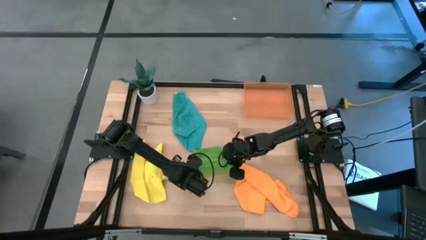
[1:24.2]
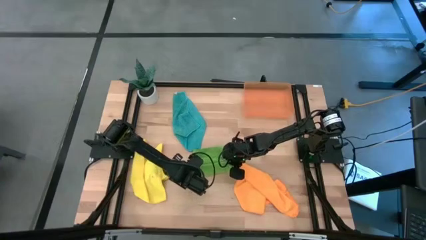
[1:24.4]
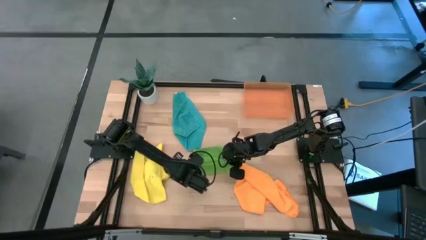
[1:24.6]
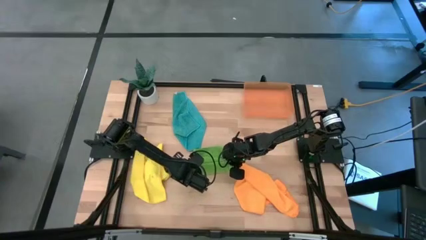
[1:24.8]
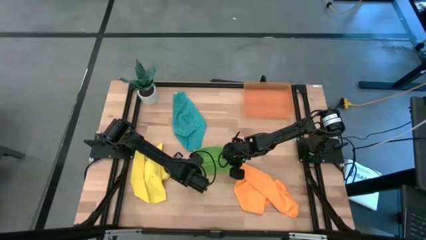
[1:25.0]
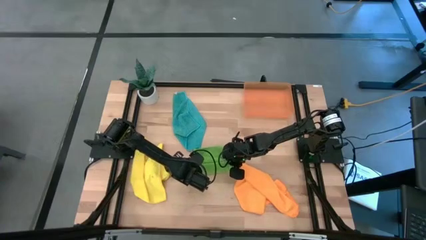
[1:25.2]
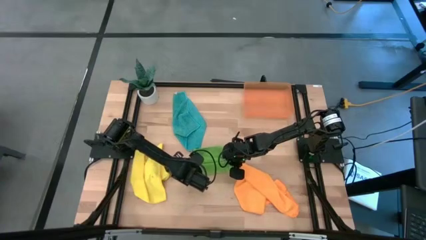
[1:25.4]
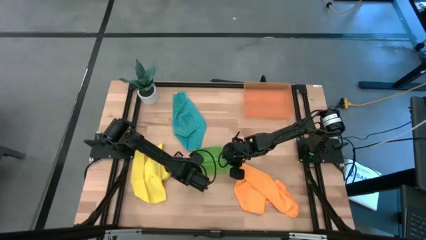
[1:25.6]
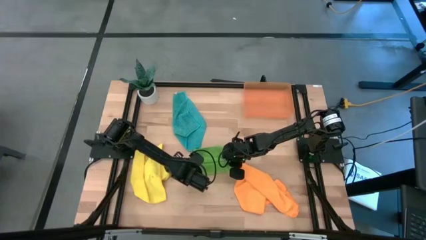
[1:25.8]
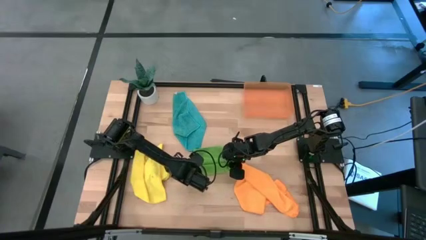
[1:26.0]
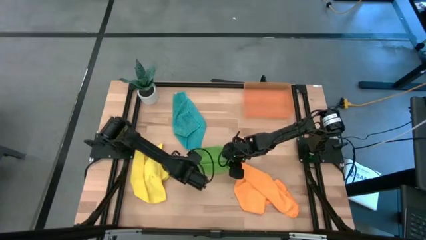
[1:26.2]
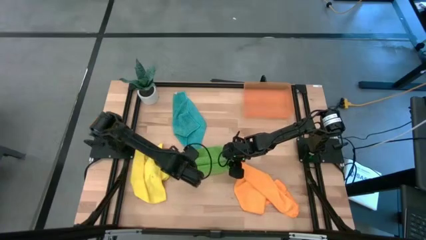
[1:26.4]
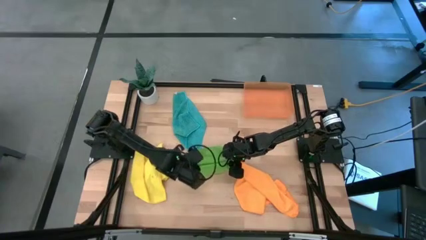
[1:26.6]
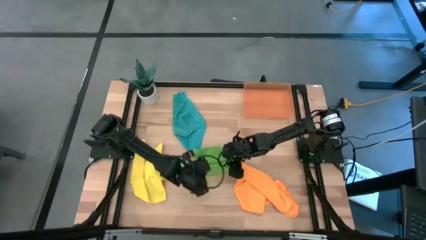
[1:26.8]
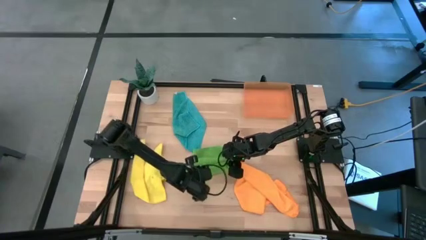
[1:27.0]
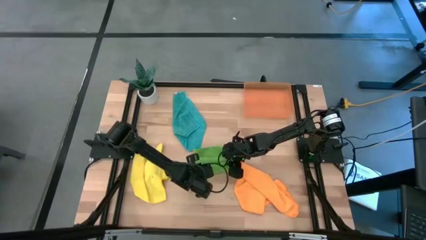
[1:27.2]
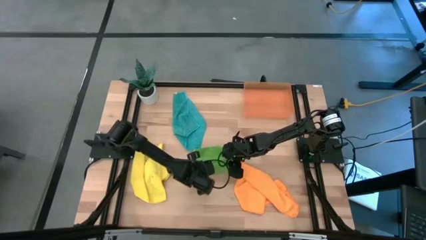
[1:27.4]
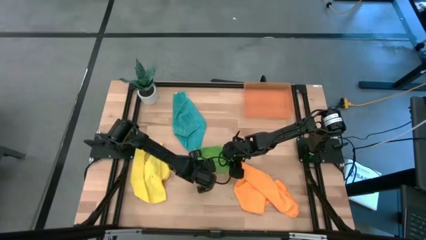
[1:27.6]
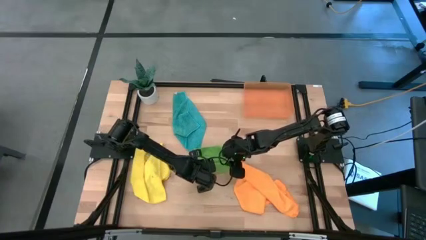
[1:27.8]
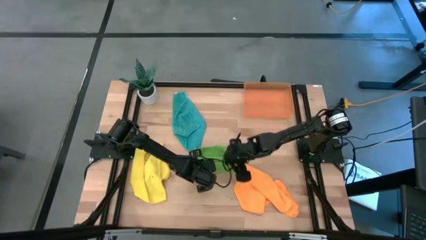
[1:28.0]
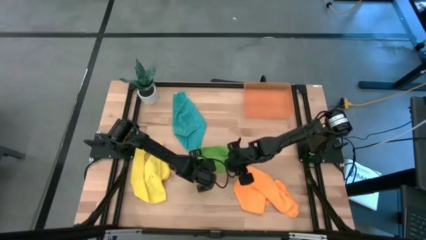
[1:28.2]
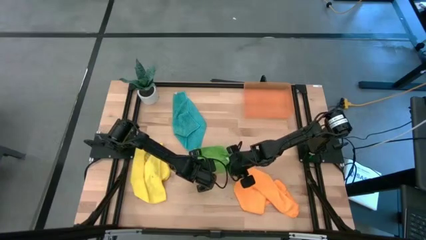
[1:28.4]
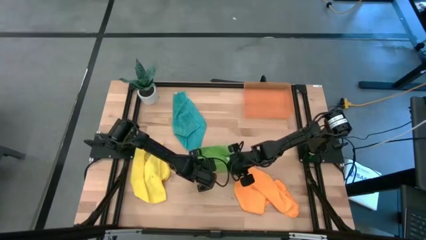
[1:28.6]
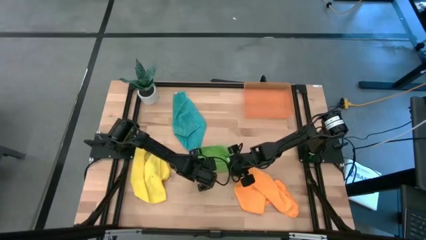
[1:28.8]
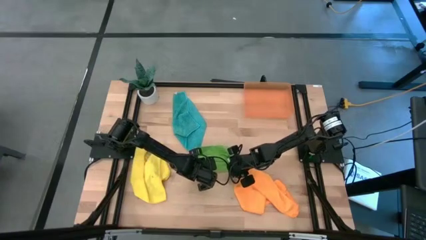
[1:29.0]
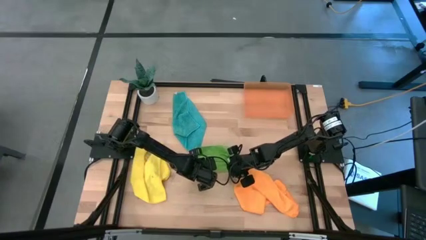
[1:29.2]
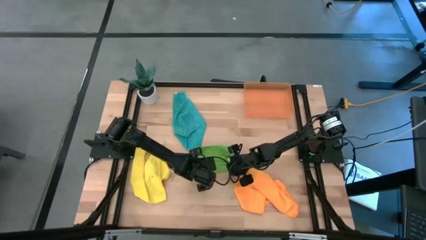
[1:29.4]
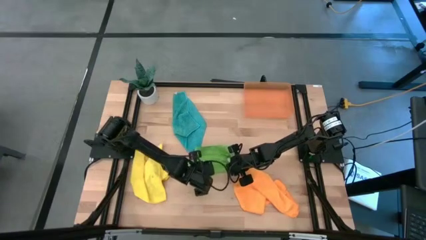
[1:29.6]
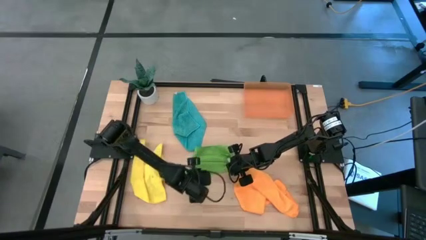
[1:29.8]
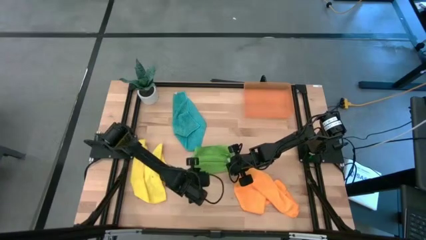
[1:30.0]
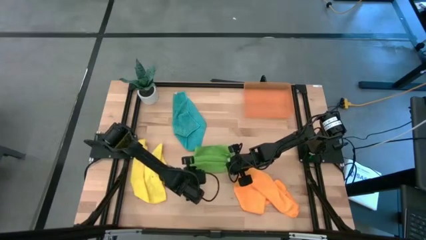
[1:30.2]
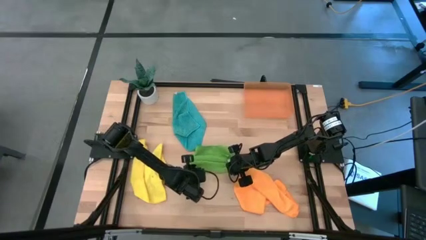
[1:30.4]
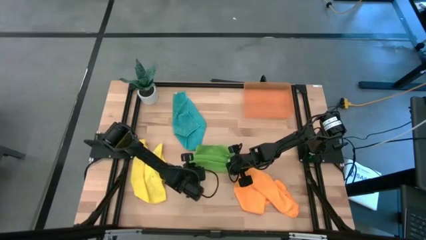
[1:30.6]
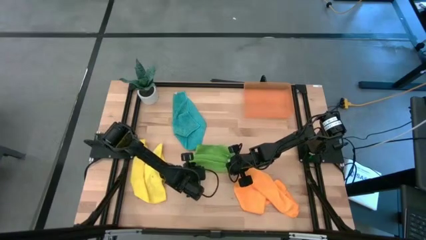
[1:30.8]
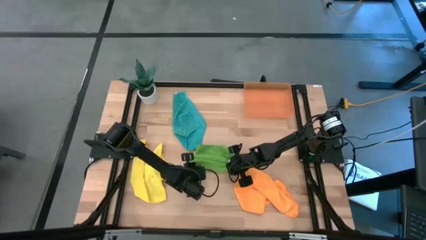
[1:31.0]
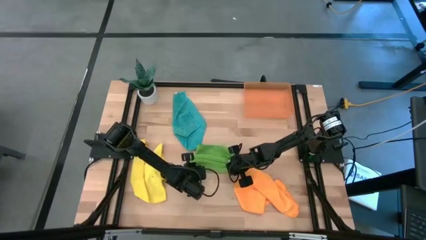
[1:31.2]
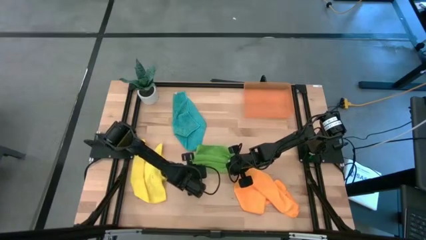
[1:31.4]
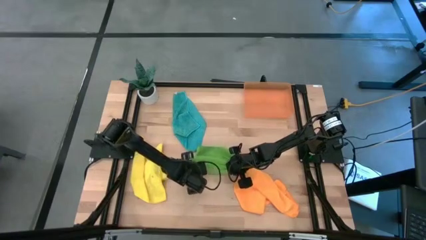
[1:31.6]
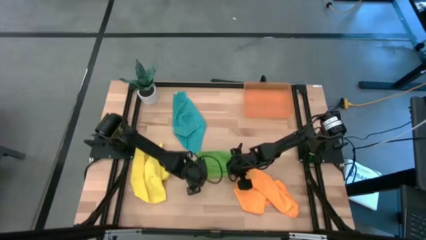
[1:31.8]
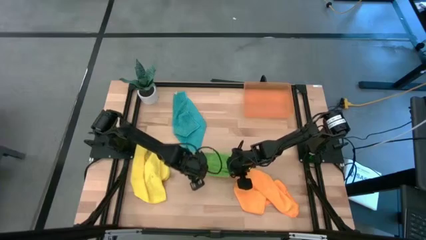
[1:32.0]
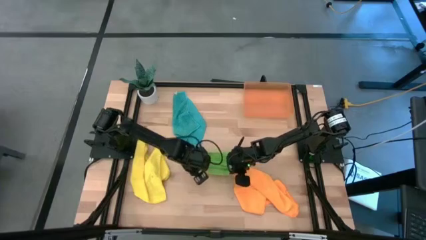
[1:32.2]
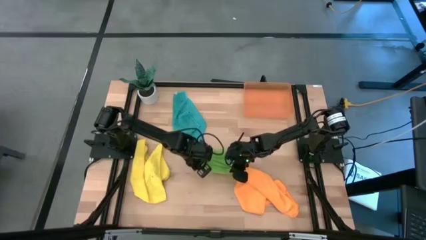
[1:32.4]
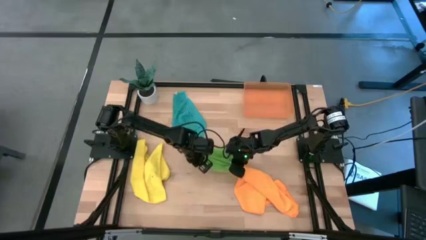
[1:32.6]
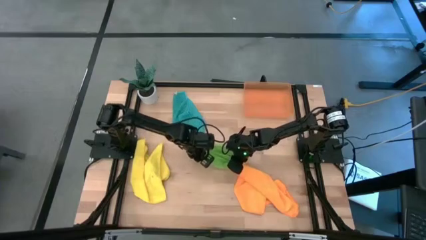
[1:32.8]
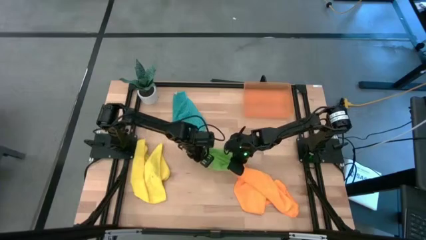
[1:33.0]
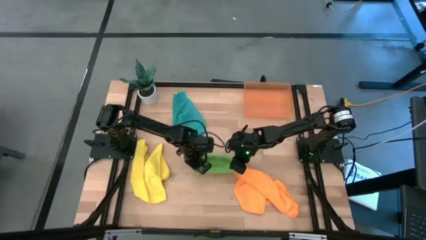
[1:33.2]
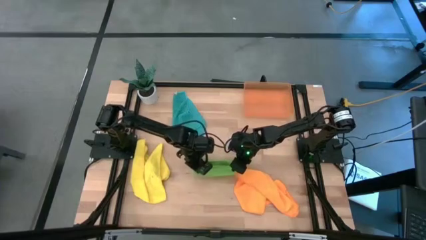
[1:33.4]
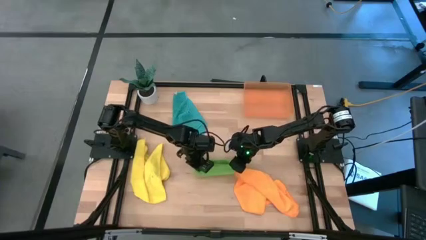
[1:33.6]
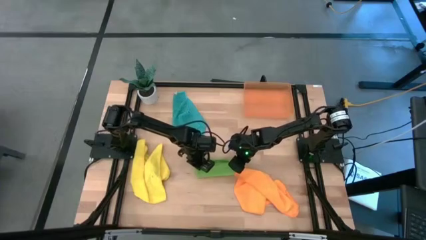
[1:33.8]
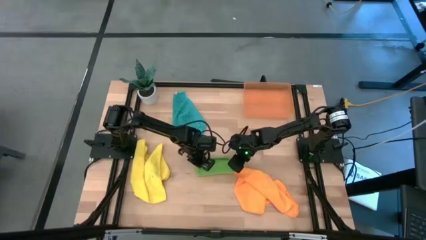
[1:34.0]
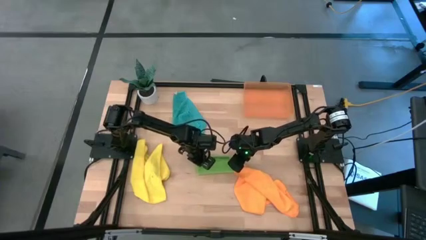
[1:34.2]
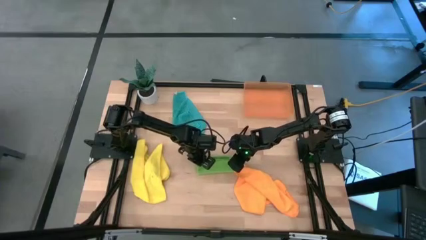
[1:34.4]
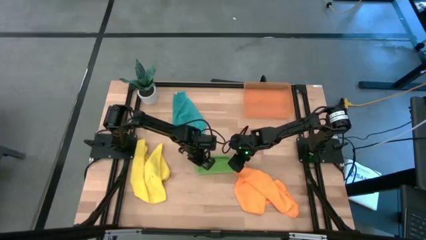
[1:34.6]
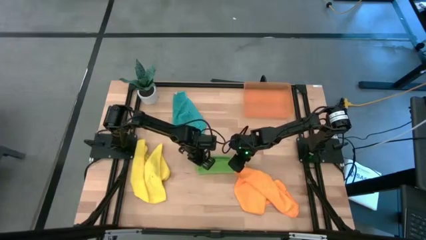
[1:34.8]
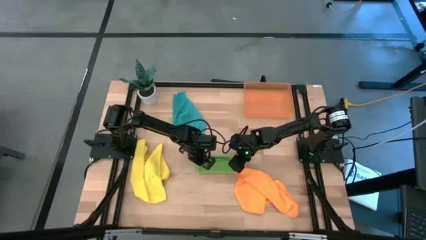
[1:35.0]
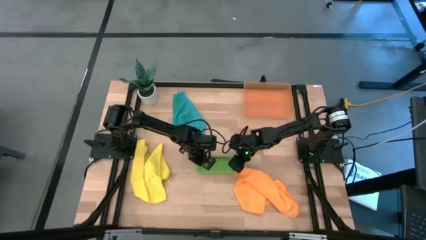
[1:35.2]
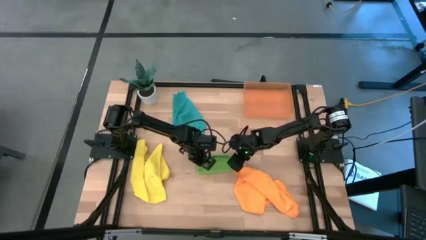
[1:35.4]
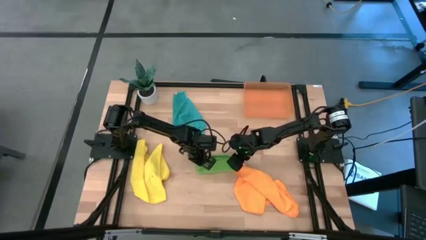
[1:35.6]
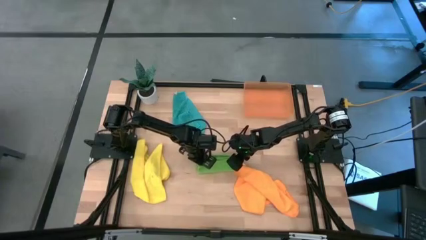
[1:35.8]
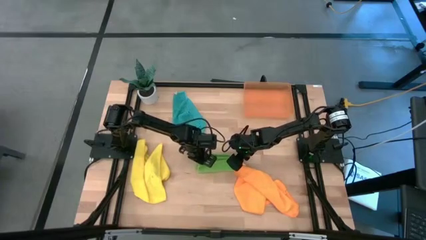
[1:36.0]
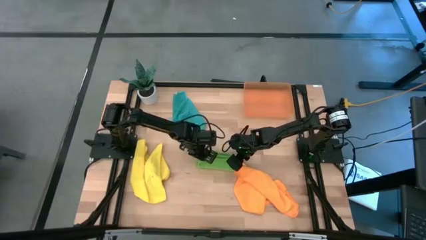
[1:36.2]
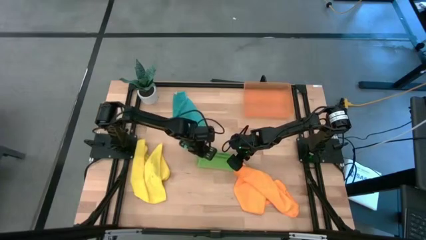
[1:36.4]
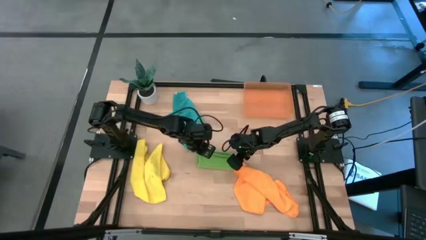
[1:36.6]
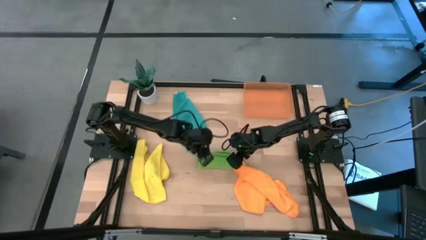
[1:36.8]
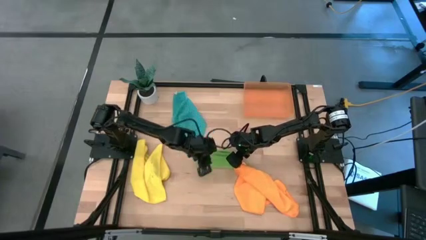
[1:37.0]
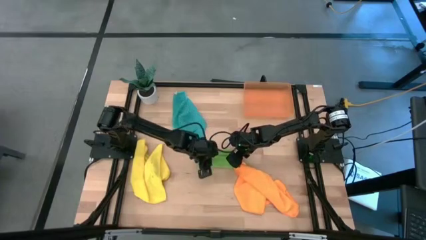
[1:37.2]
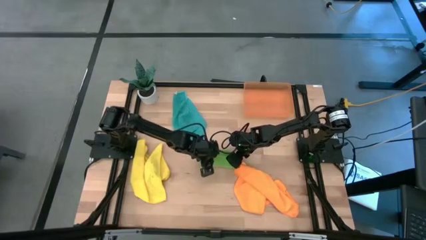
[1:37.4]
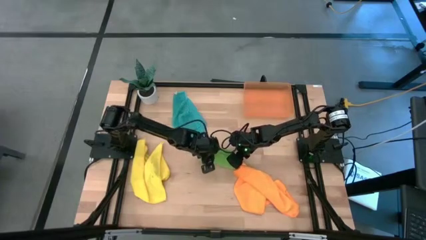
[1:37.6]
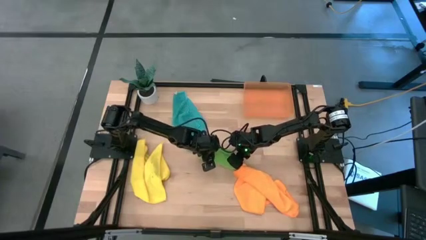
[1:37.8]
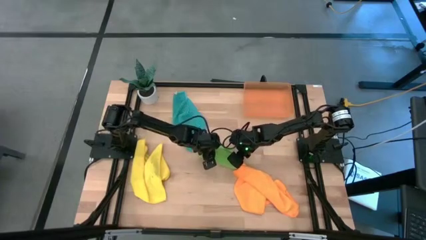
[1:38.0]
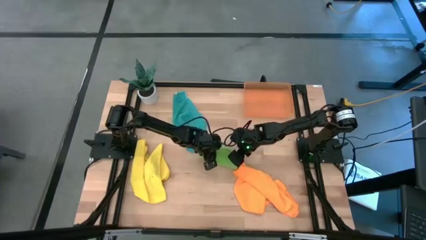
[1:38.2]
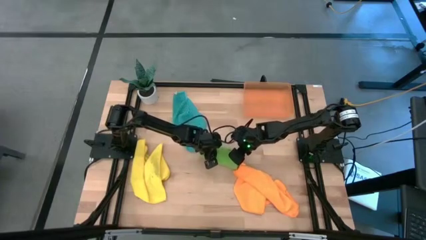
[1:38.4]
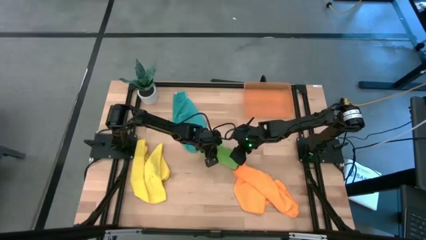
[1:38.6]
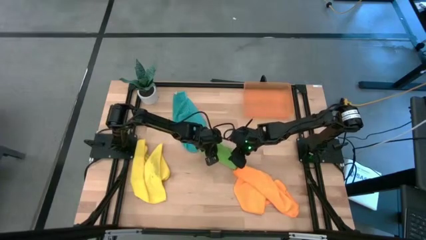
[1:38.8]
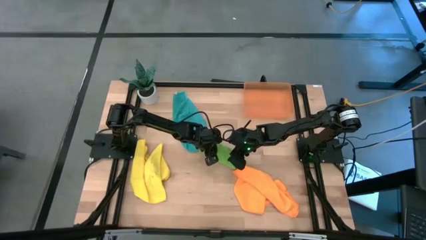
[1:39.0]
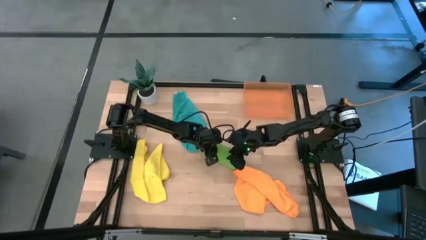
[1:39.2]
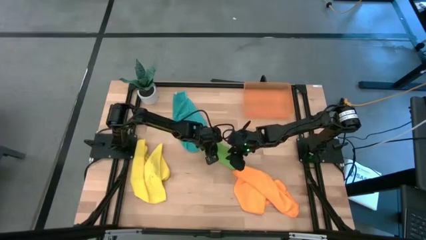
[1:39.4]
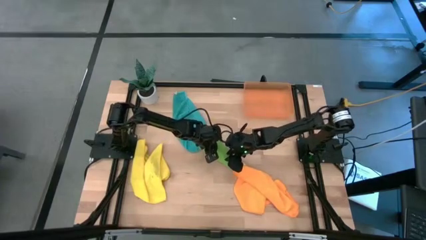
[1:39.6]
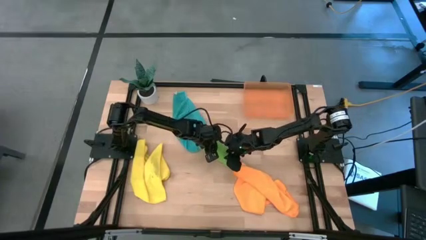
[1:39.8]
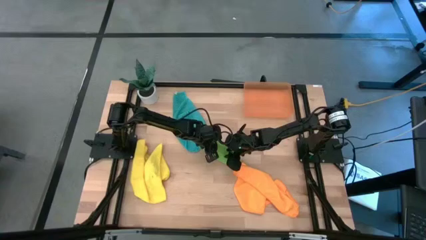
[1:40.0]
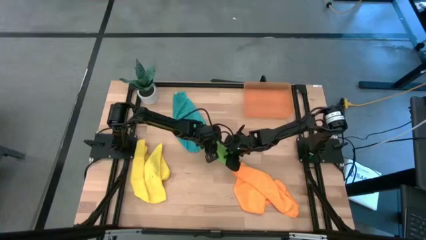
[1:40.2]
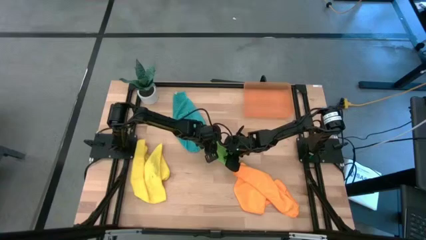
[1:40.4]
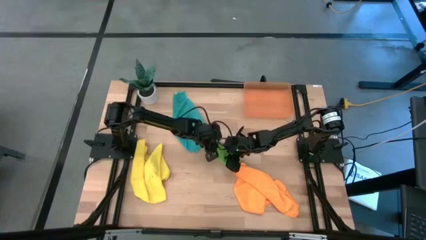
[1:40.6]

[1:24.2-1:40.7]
Task: Roll microfiber towels into tight, uniform cylinder then place into a basket
Fold the green towel
